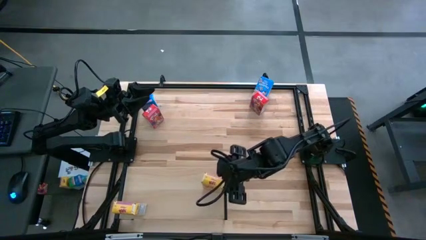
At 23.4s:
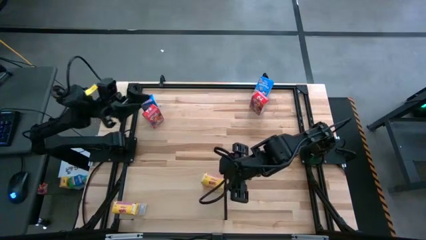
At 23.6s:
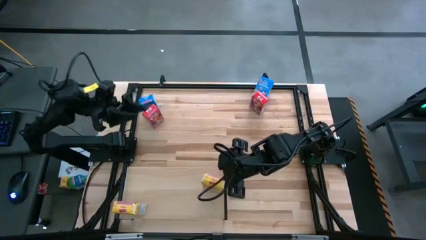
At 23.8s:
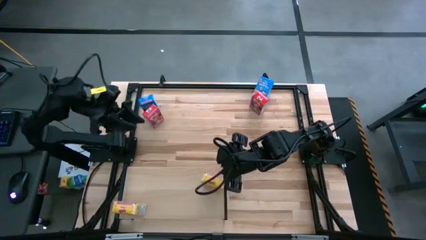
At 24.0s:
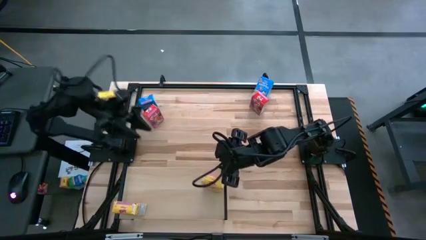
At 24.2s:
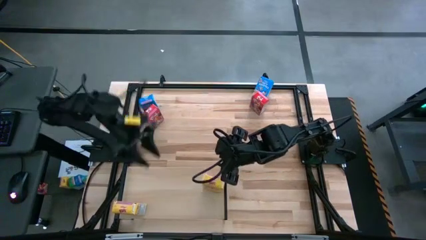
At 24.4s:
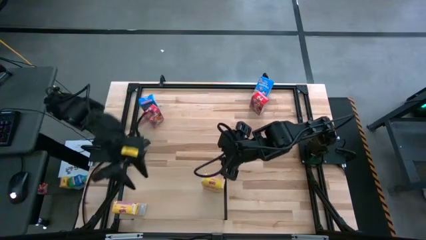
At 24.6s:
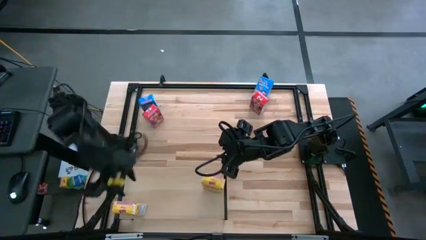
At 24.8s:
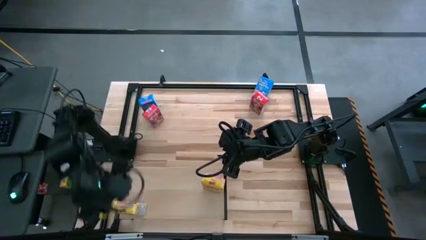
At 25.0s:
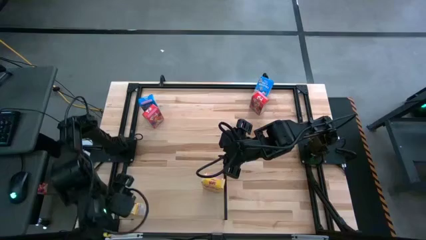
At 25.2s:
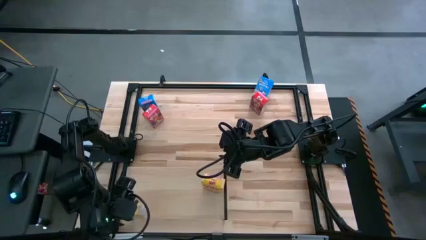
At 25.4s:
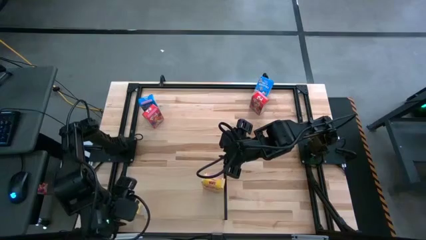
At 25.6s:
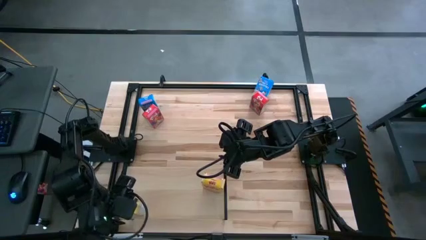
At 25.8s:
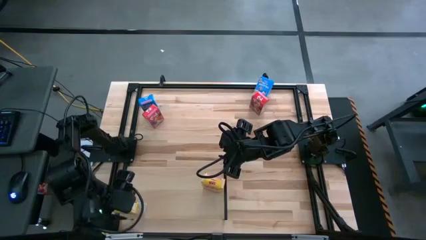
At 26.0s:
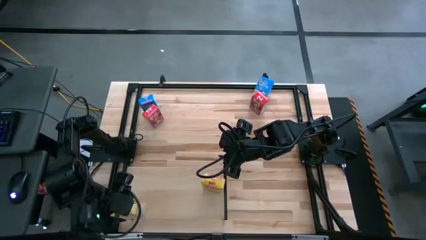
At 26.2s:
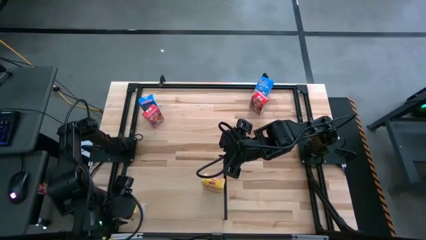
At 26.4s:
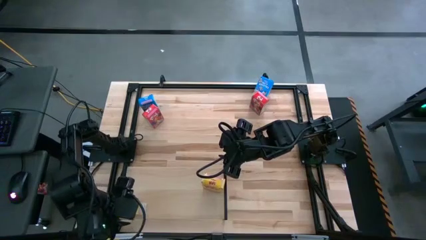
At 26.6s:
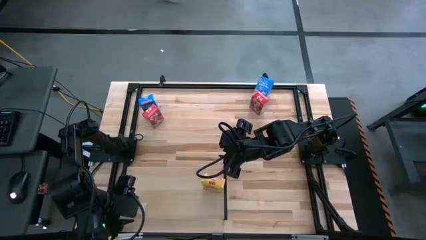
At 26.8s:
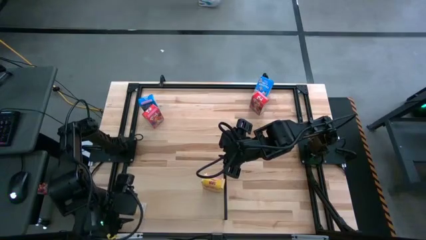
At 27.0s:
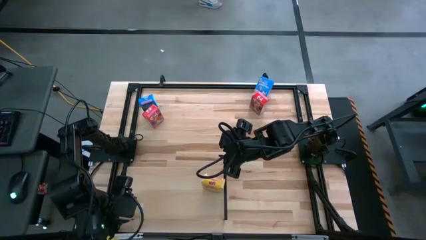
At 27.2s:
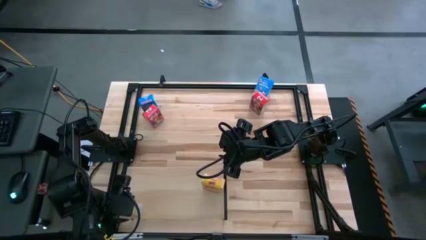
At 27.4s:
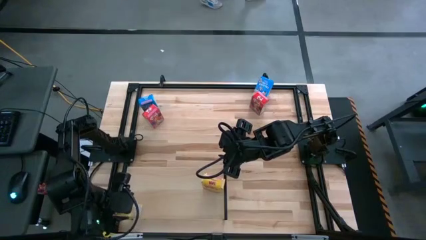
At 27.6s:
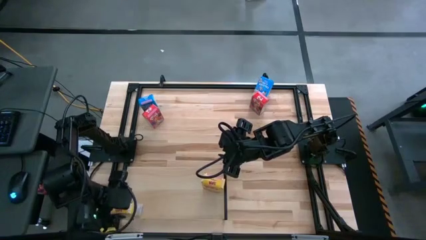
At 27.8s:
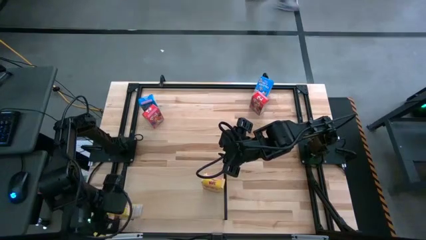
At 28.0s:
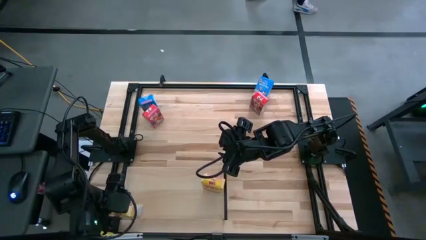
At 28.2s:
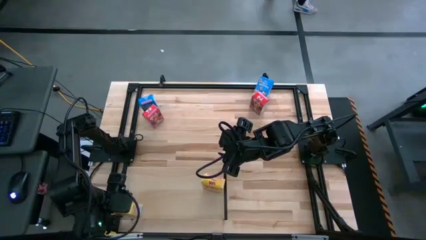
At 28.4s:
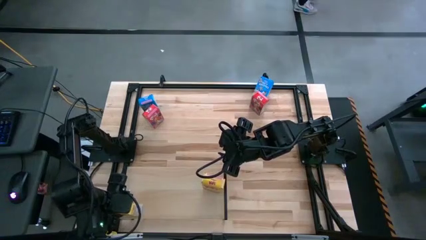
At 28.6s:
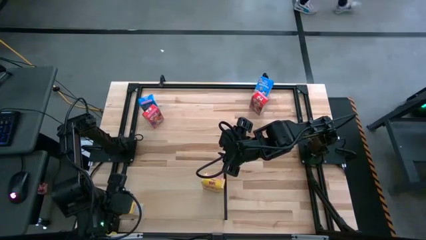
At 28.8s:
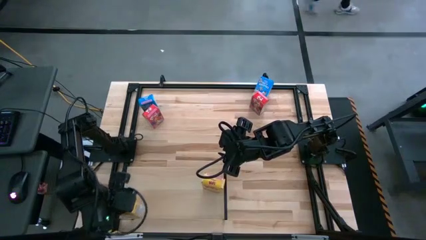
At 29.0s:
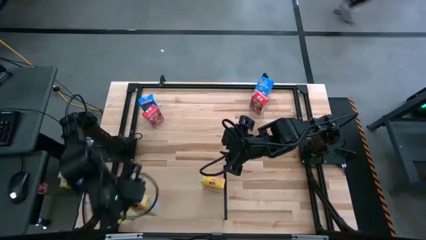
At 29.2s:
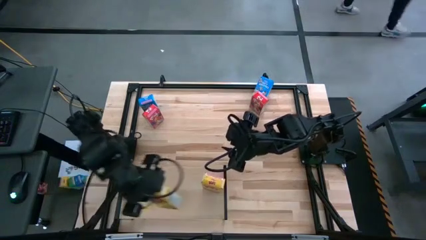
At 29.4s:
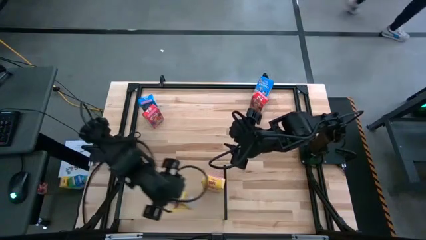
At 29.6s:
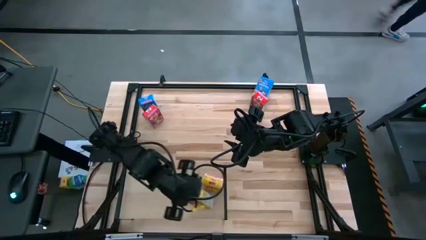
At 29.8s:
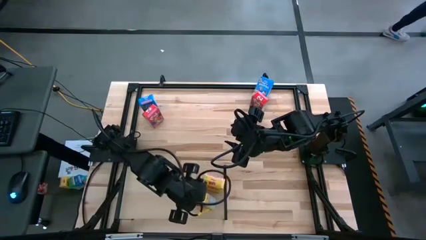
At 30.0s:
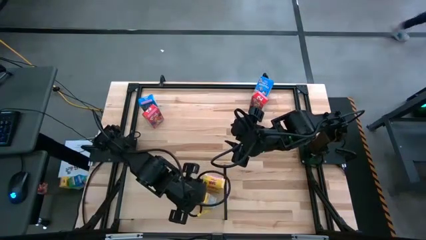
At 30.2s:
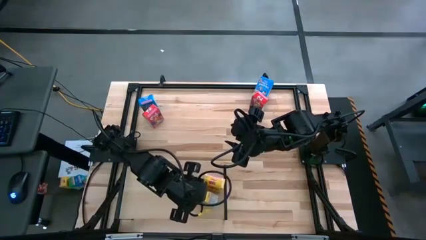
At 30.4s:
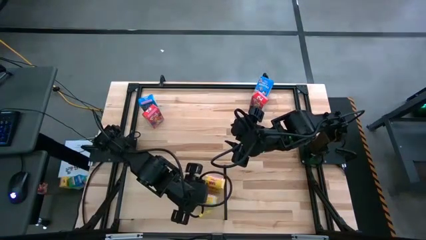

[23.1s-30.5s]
Task: Stack cereal on shelf
Adjust the yellow cereal box

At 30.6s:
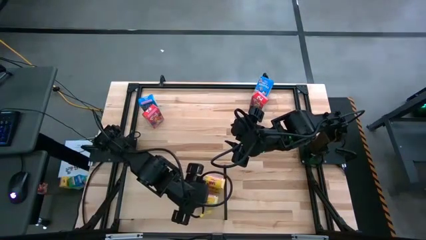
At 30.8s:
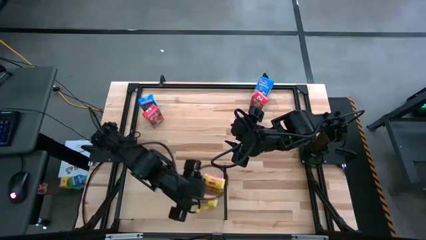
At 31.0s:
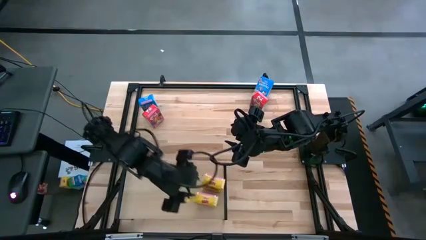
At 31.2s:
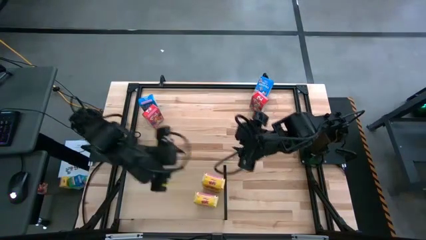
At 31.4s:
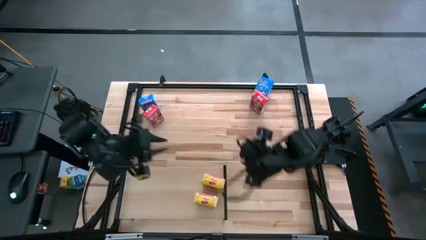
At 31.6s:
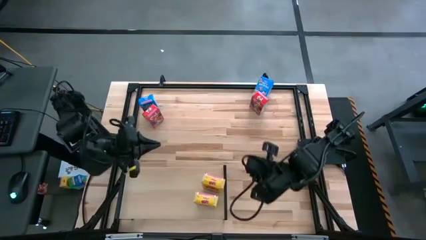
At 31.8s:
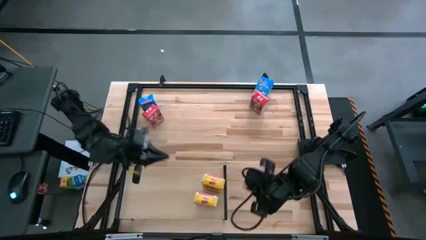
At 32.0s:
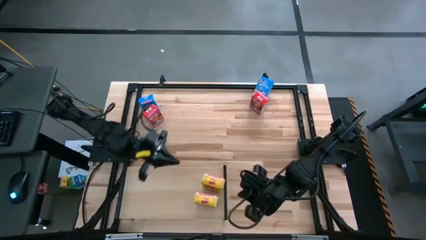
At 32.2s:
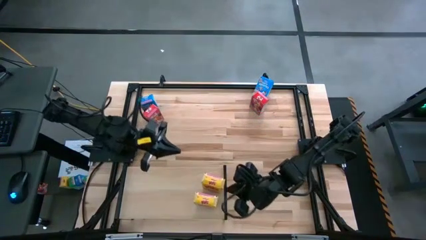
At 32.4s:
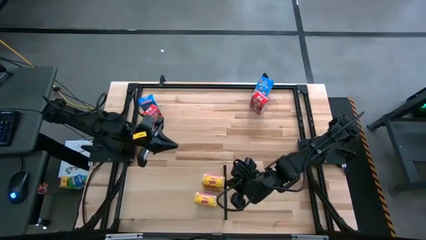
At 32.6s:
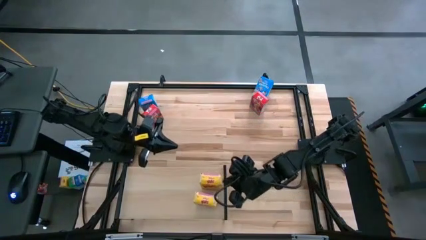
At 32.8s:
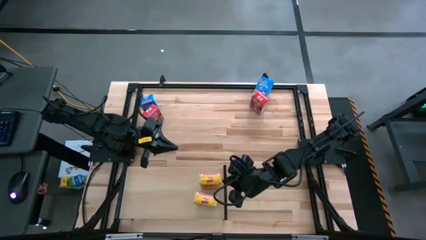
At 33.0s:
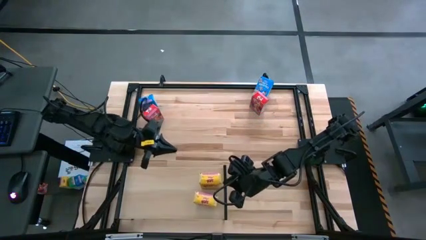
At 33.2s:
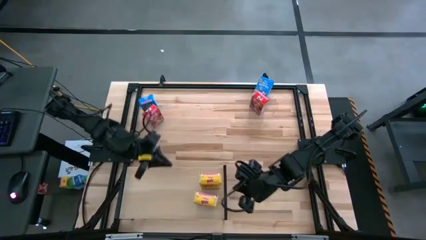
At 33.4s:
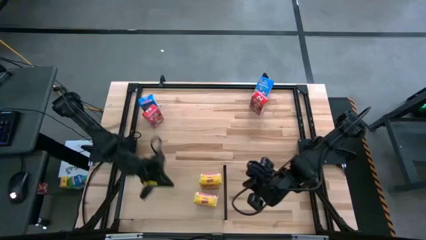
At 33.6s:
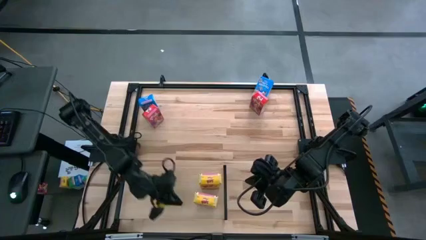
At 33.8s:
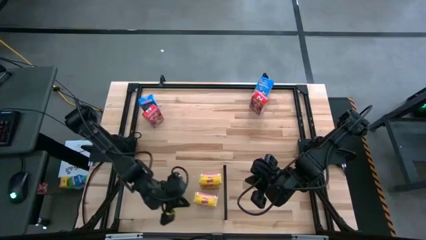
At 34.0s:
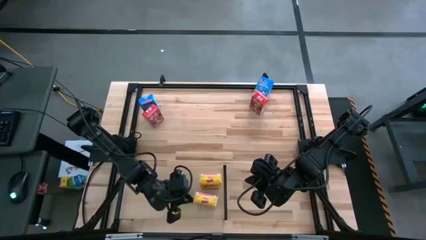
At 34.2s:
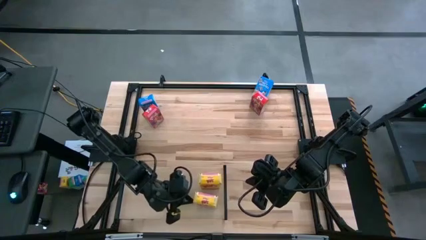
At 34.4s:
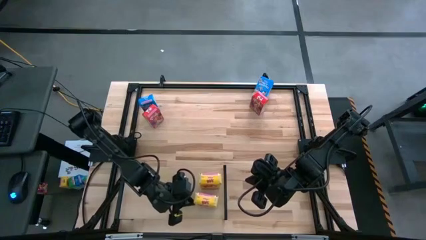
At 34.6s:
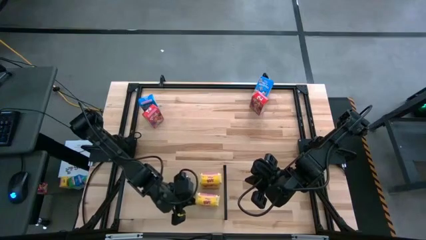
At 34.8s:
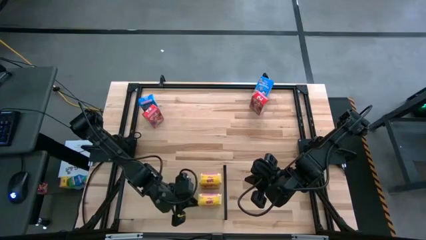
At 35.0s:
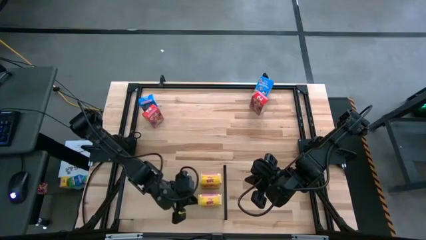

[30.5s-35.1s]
Adjust the yellow cereal boxes on the shelf

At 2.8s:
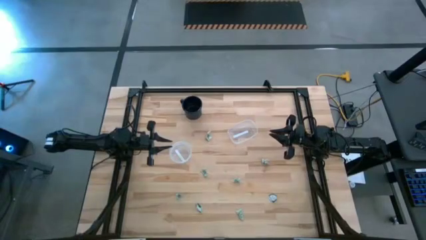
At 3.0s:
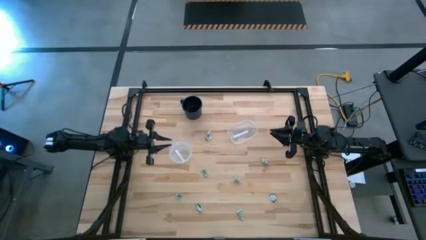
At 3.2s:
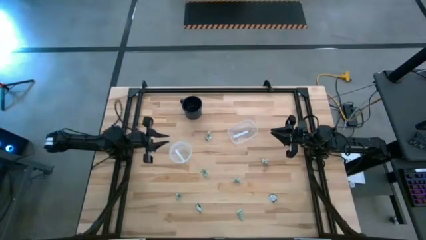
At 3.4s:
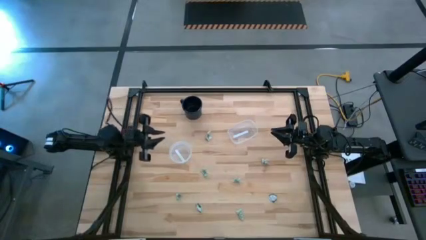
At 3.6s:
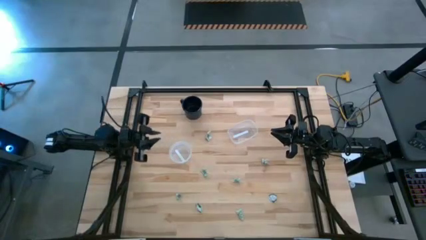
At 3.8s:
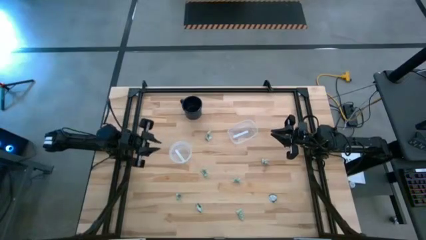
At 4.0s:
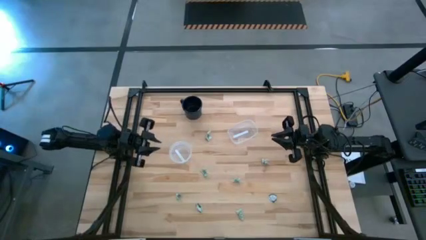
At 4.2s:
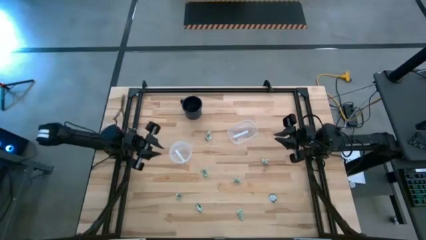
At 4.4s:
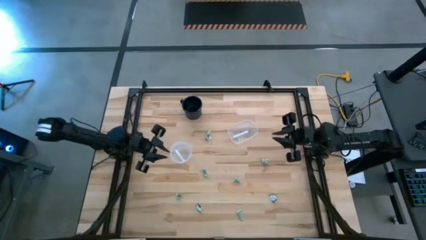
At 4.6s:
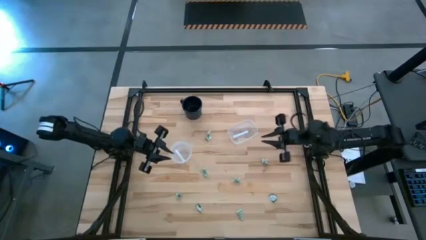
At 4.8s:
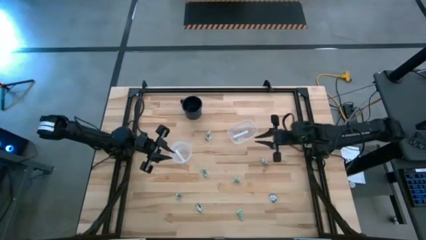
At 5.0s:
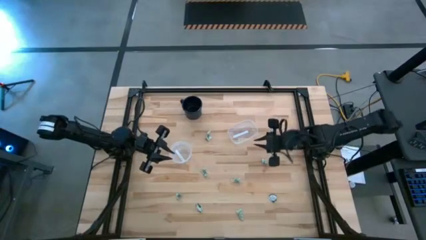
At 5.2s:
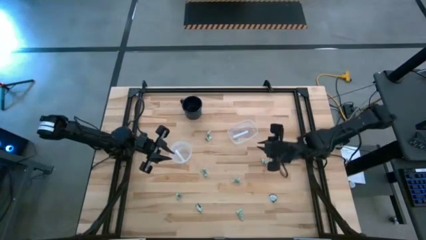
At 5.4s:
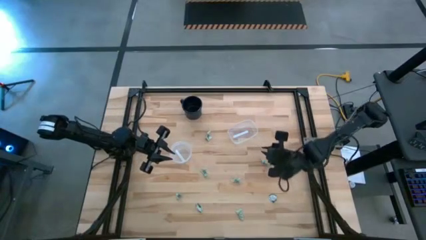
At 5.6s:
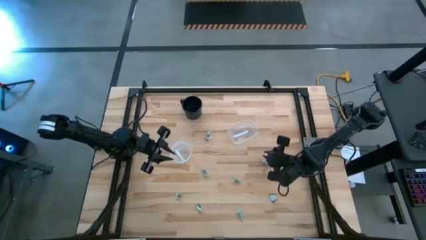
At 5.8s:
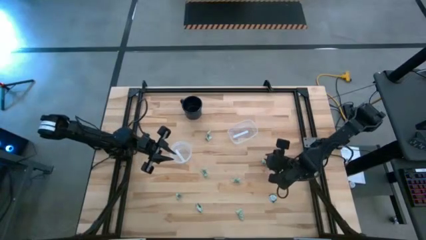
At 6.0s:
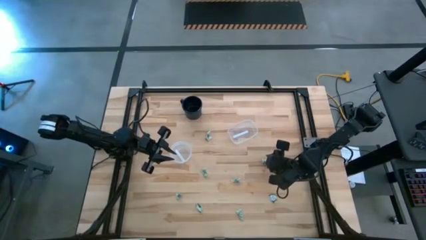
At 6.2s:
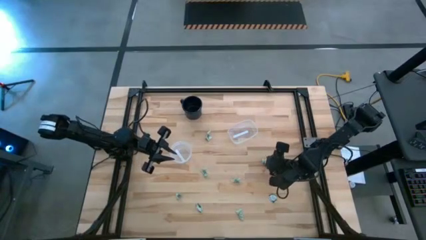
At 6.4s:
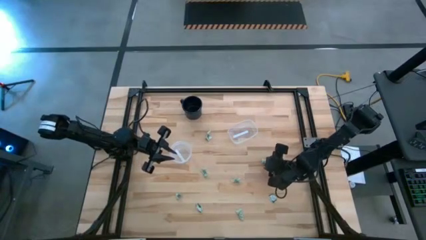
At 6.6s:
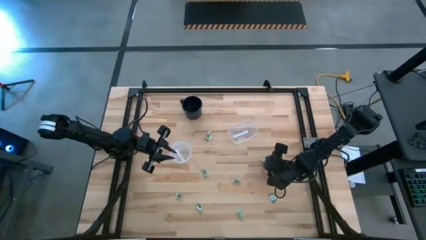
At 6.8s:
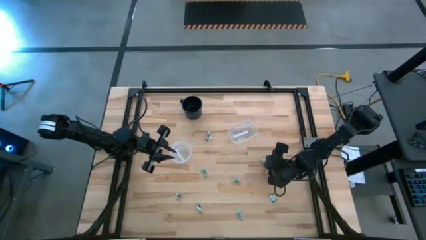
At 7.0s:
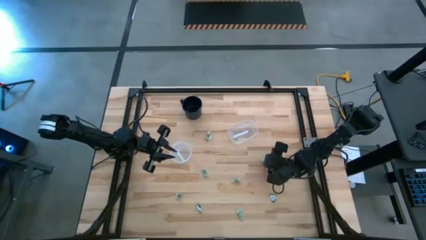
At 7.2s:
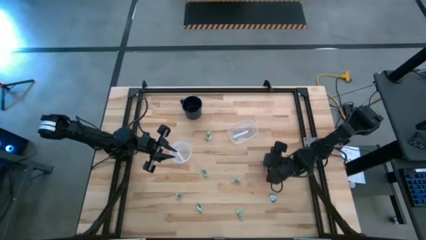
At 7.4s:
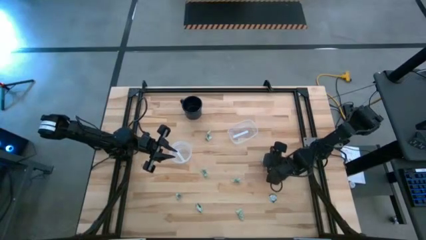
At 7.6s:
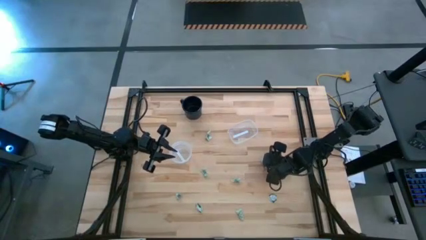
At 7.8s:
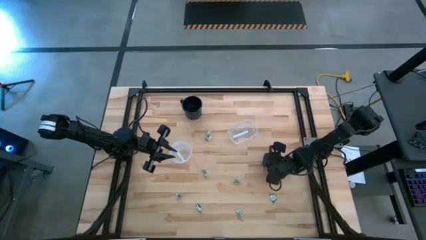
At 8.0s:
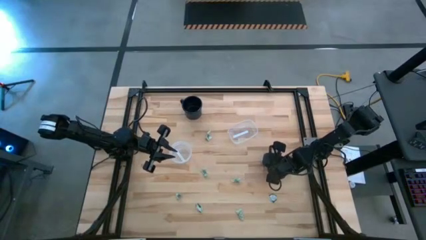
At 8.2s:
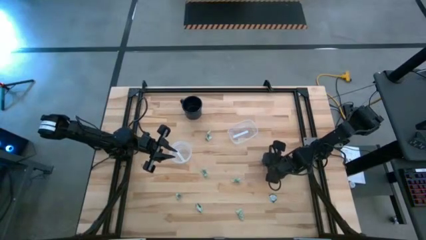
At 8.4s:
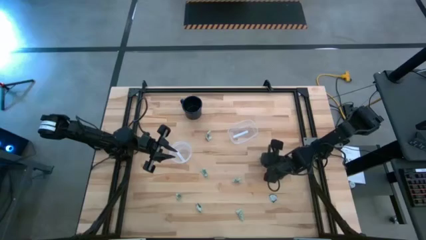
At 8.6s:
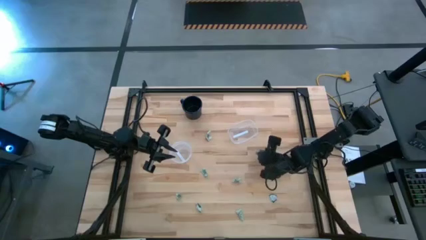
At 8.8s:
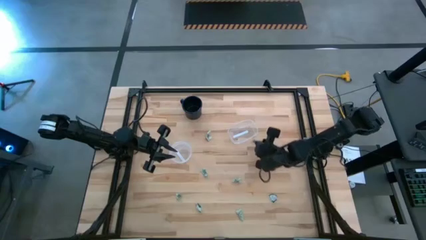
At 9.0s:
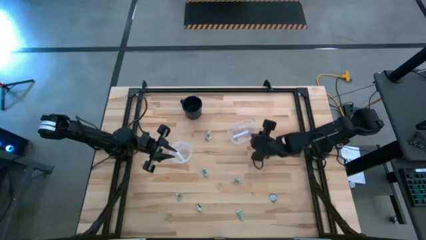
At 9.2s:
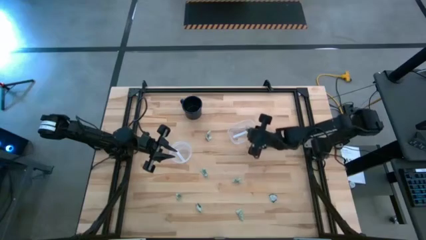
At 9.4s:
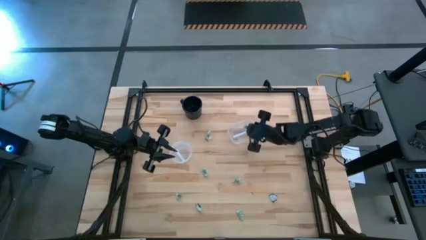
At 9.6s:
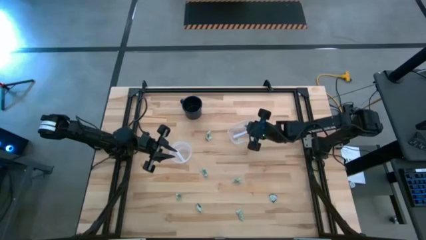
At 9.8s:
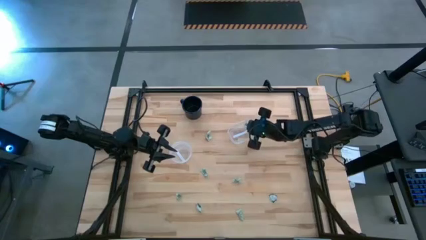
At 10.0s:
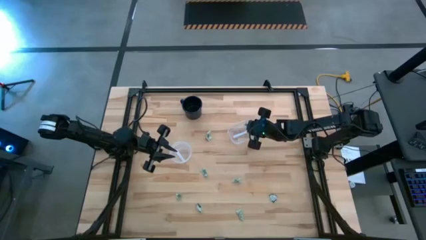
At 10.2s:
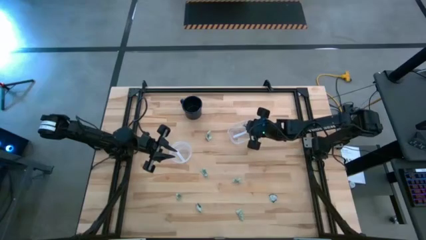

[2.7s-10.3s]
Task: Pick and place items into bin
Put the stevia packet into the rectangle transparent bin
